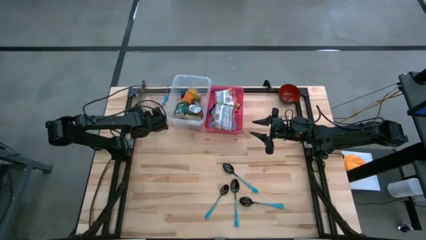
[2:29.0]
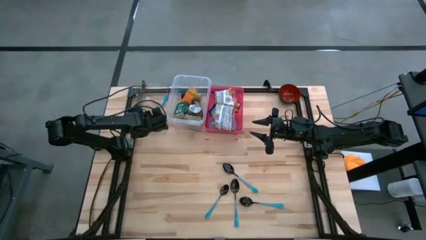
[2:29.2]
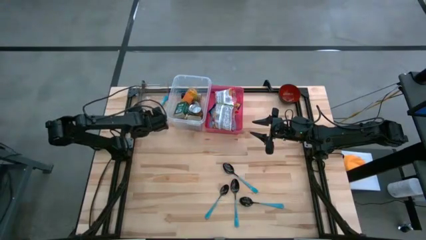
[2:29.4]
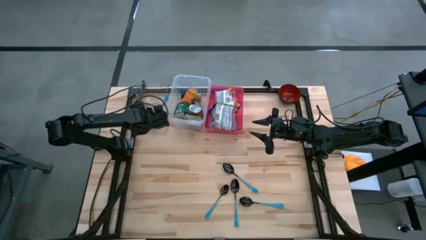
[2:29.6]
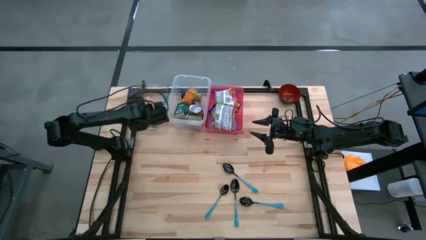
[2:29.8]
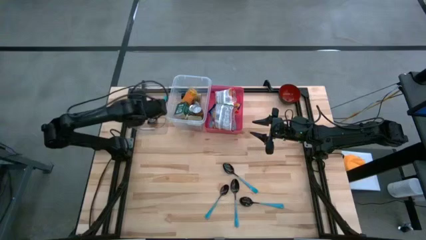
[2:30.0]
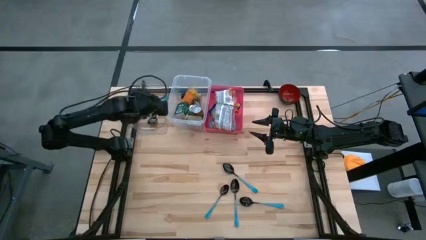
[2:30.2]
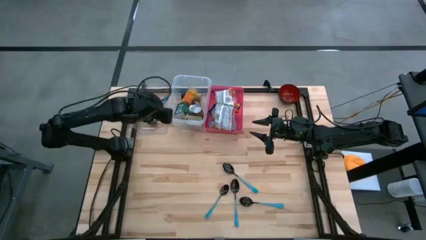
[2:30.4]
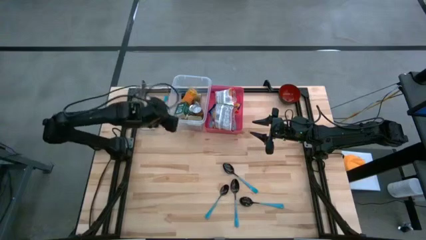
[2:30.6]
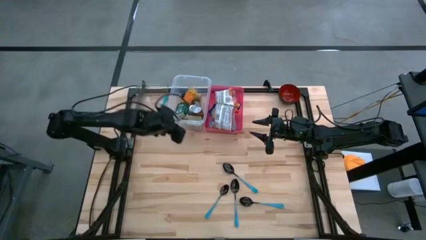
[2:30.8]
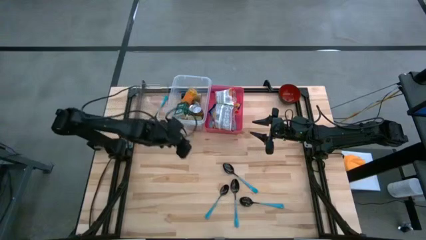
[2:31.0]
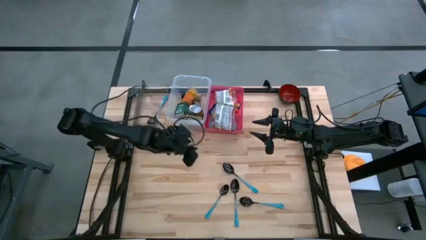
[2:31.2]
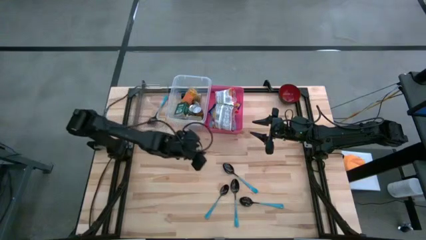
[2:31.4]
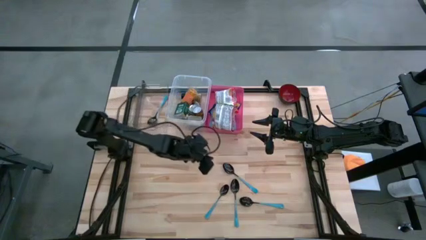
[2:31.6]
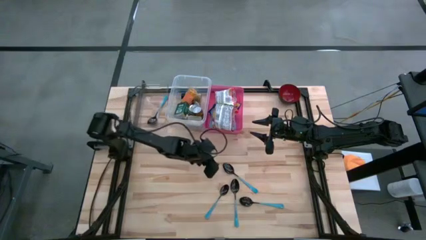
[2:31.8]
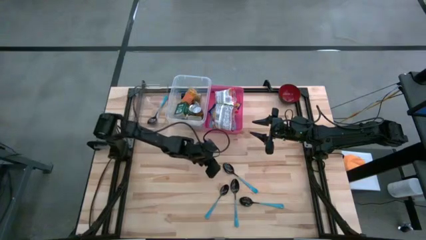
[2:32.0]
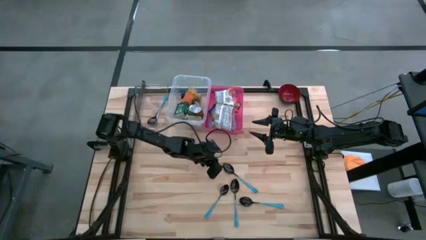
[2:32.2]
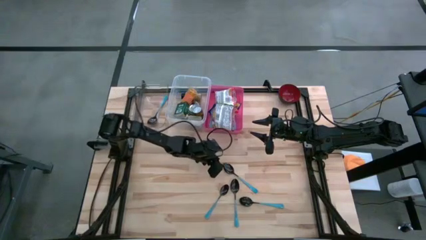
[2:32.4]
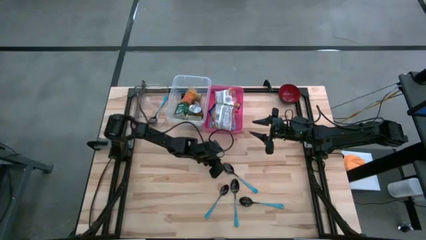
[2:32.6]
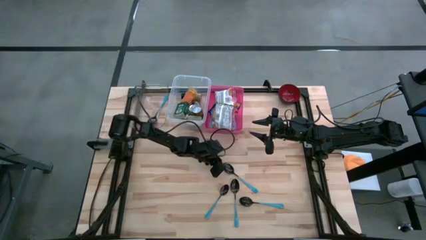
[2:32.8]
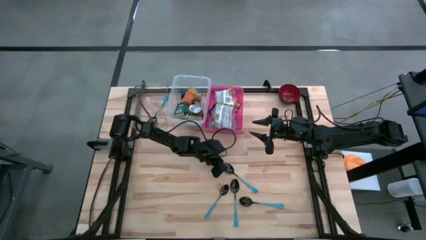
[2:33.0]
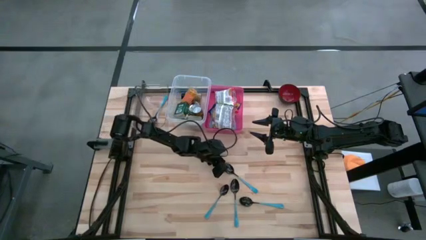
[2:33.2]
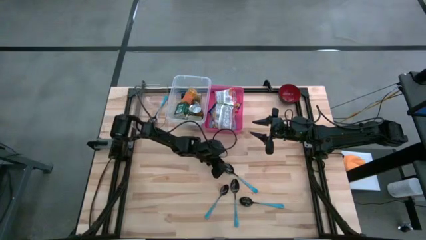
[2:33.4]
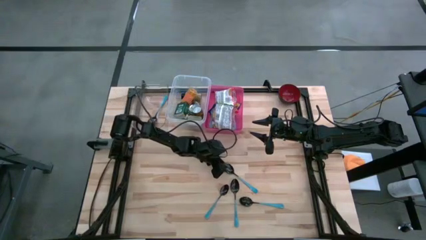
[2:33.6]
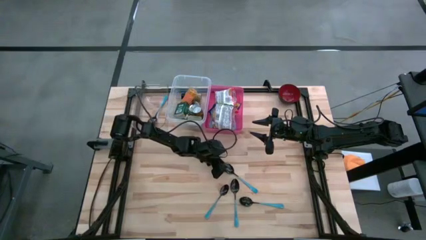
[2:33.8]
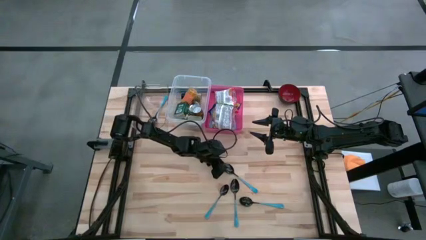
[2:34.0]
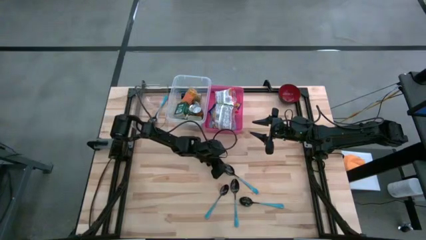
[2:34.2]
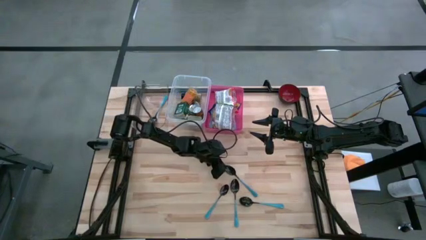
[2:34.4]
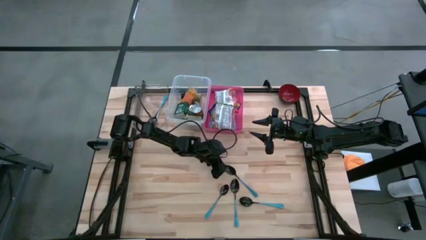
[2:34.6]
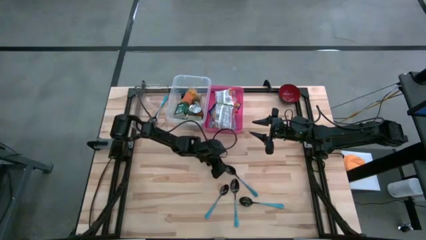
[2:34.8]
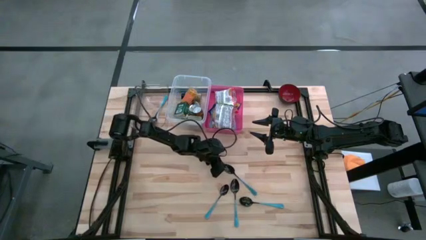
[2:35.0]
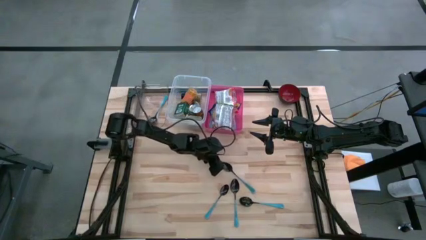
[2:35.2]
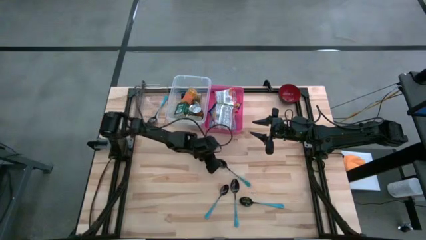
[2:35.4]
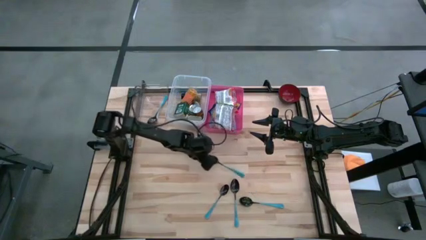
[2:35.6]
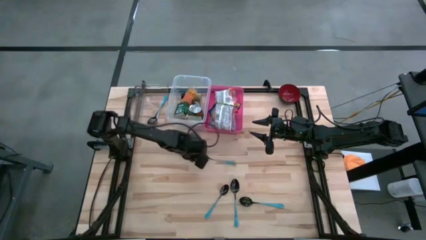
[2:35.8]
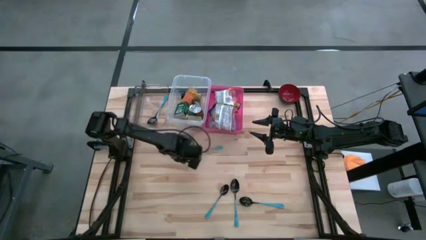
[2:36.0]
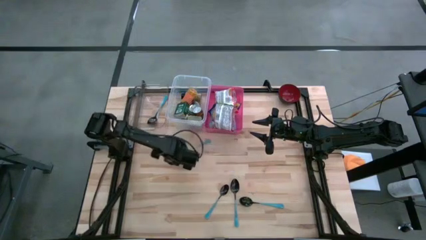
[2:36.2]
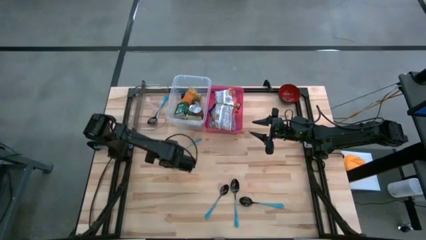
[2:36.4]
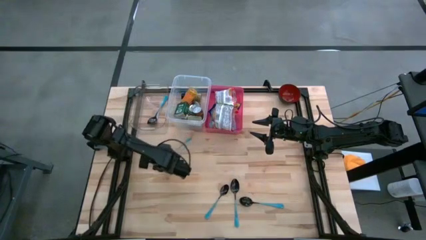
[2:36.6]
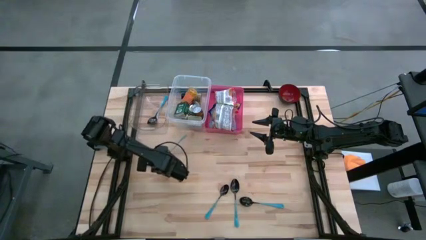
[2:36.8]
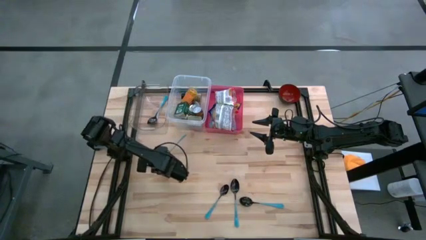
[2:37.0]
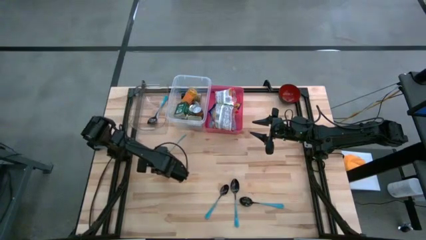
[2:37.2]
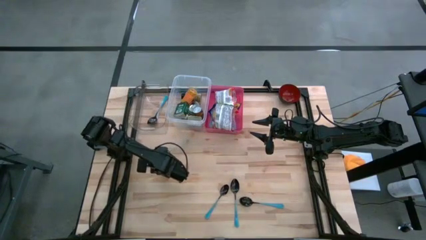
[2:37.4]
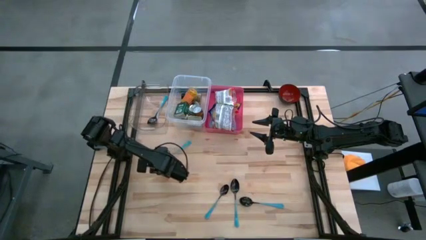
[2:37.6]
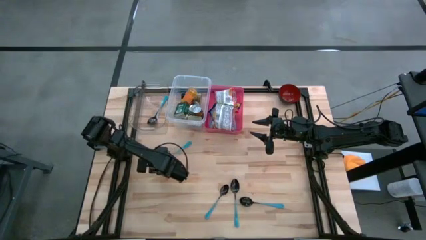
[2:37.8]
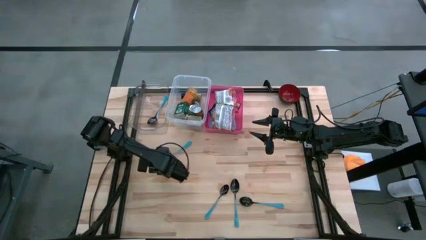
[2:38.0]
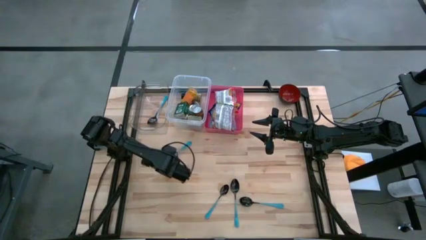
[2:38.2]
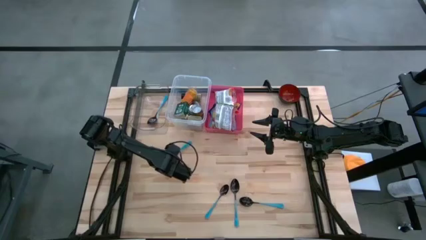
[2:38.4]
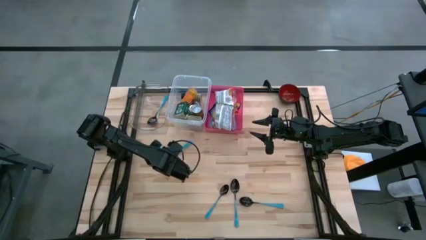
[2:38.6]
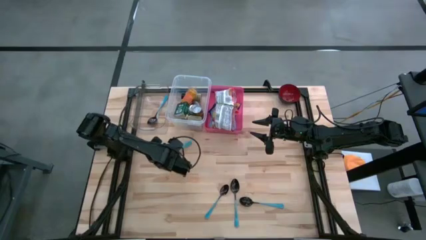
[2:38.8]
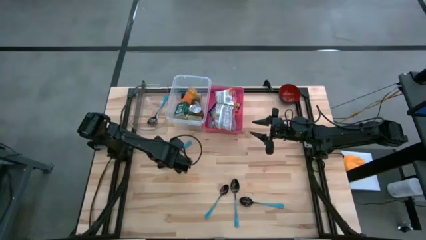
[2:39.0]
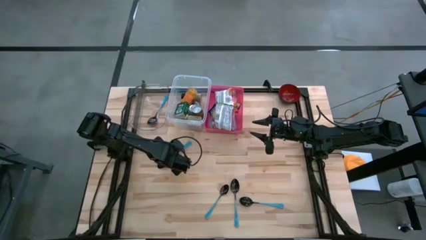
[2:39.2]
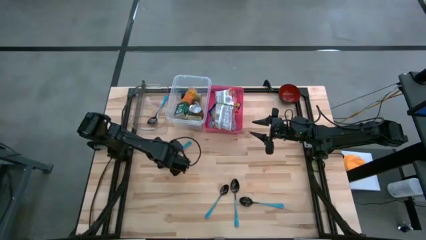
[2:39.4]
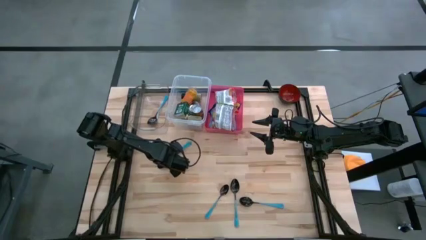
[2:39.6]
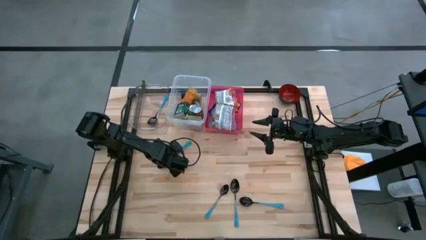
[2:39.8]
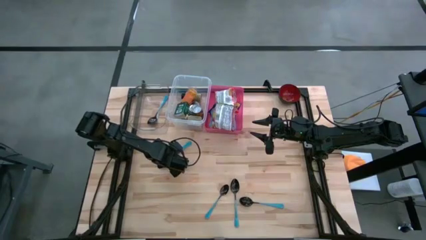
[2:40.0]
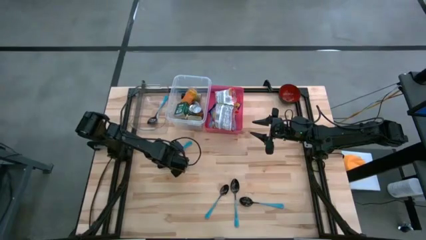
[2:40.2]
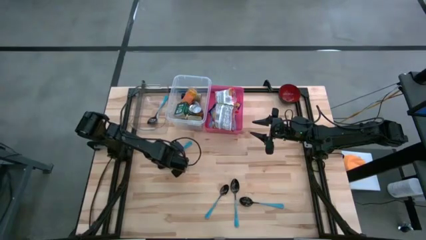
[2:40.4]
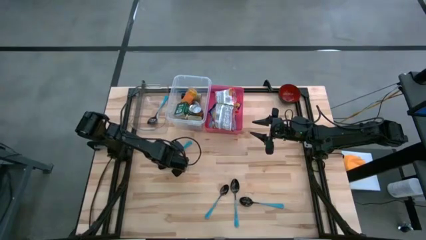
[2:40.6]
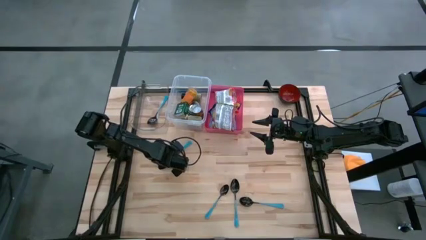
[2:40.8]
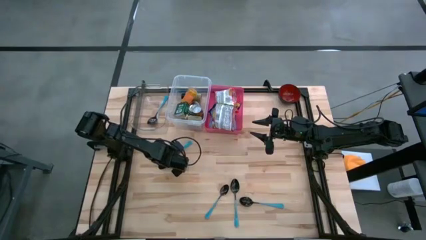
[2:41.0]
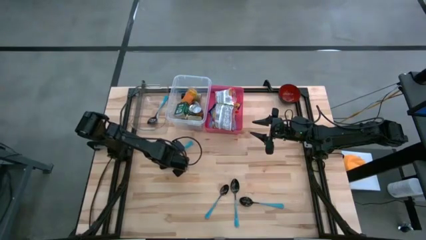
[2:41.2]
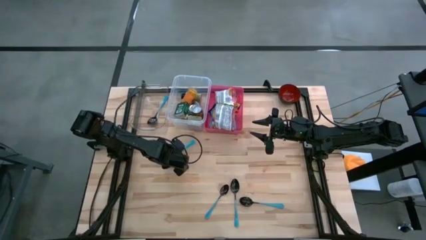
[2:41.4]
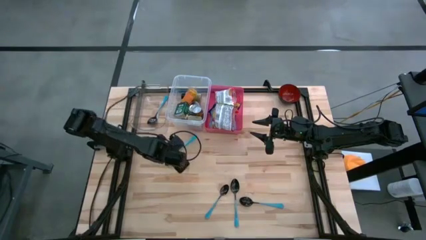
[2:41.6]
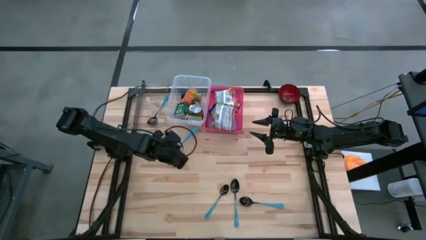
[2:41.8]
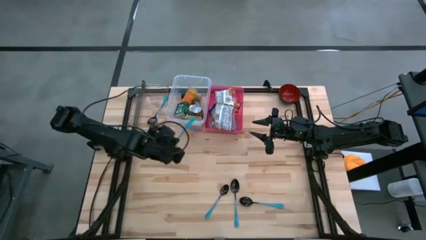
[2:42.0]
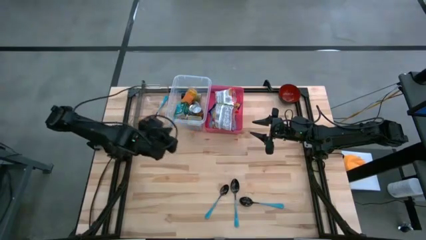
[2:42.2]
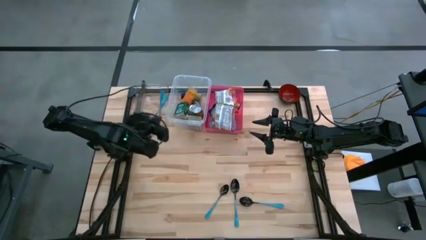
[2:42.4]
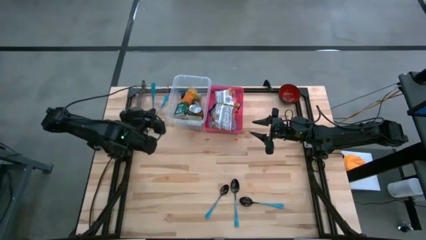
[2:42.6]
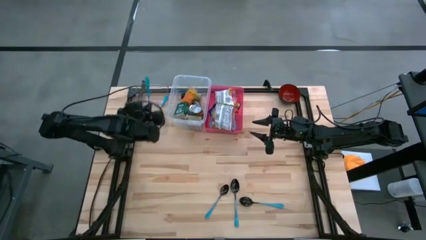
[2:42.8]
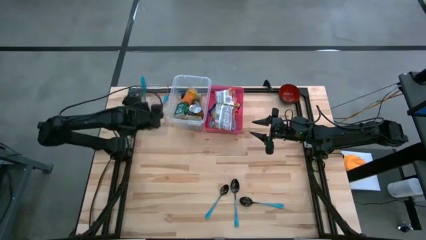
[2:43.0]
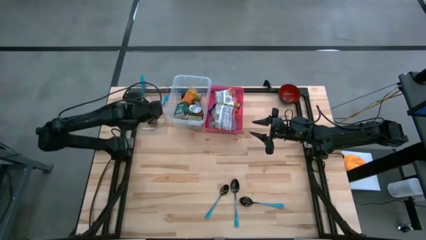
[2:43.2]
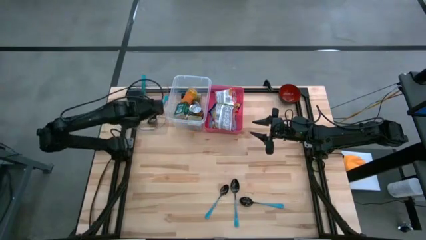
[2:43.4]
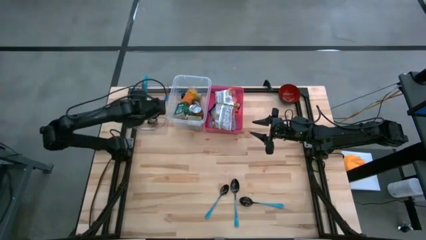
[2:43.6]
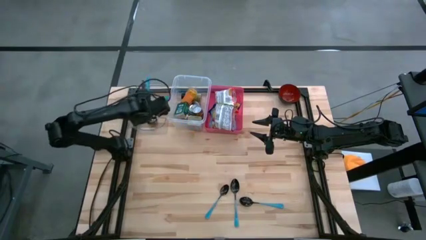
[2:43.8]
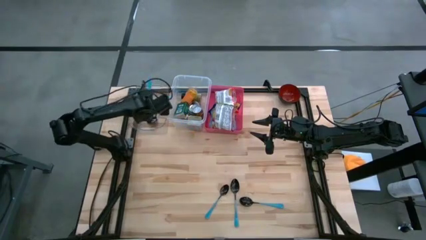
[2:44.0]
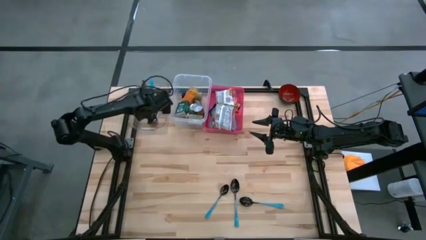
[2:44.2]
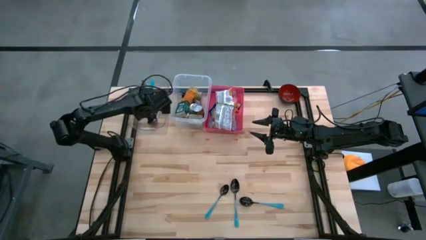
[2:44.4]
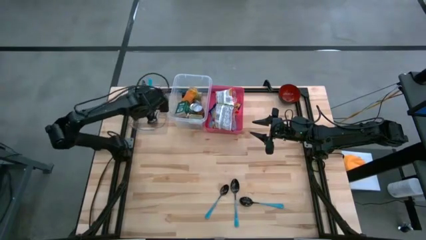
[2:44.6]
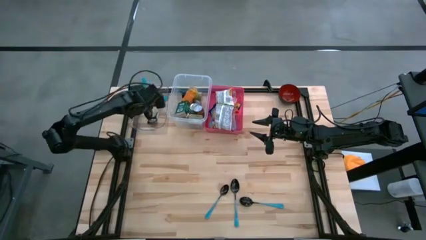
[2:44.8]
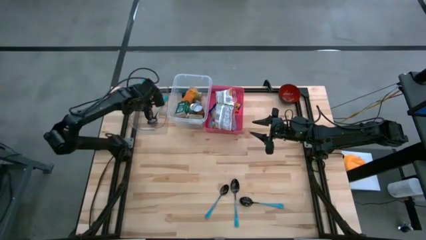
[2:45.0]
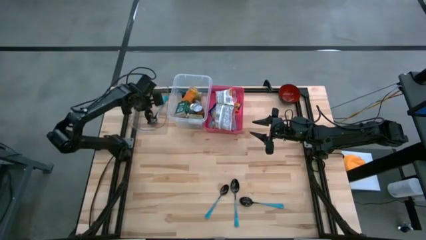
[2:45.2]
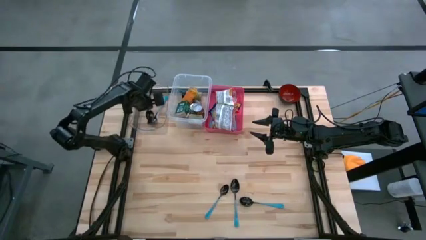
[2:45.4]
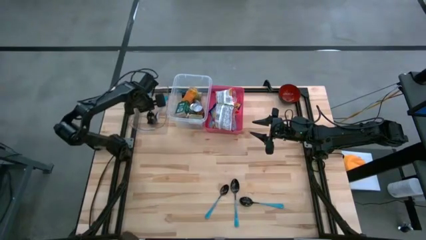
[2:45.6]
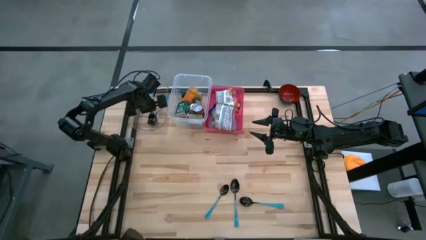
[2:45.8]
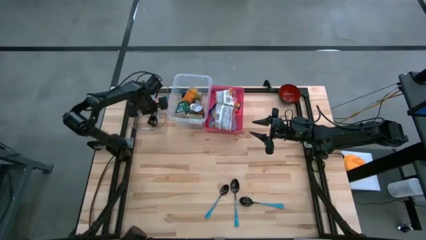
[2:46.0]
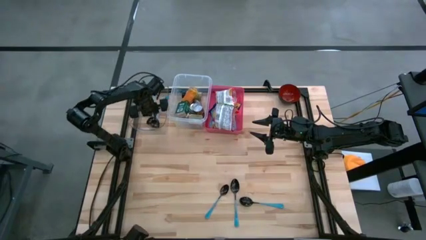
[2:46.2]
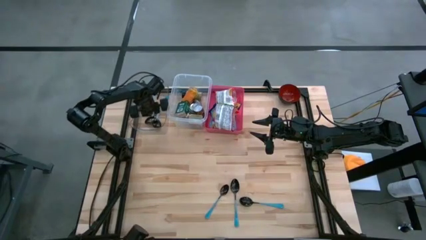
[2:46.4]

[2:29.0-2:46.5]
Put the blue spoon into the left transparent bin
